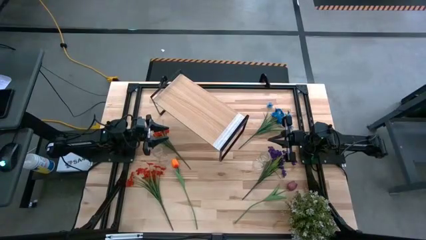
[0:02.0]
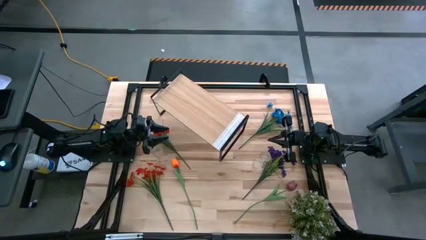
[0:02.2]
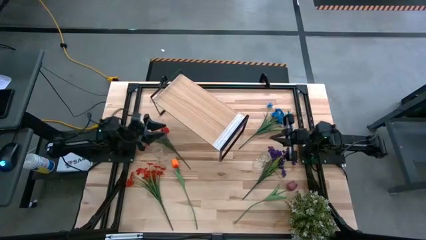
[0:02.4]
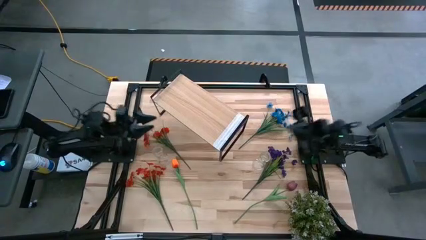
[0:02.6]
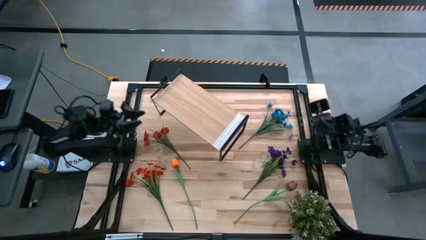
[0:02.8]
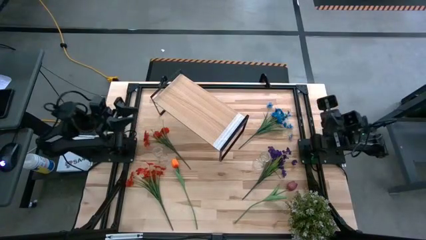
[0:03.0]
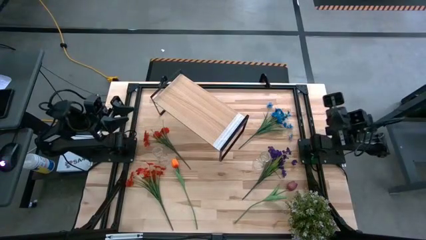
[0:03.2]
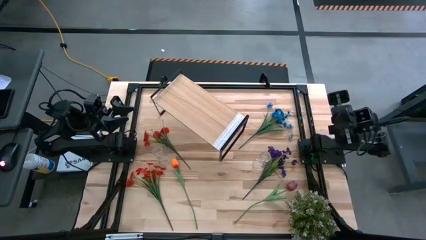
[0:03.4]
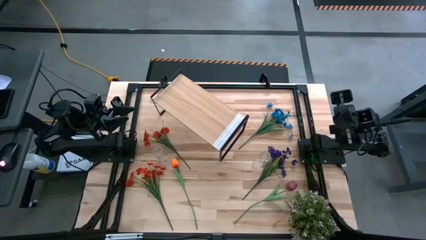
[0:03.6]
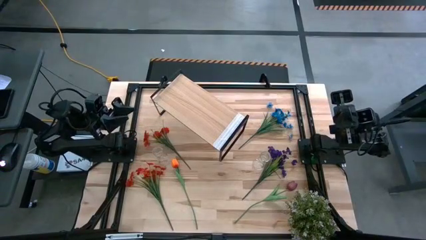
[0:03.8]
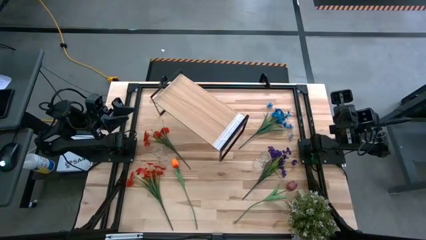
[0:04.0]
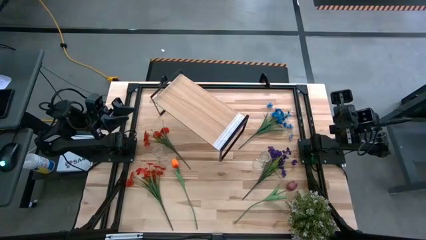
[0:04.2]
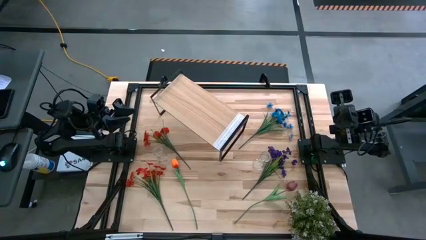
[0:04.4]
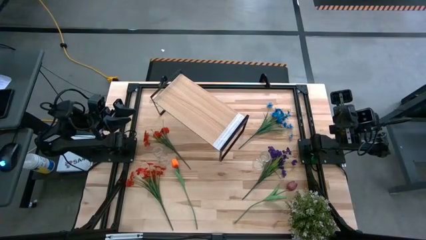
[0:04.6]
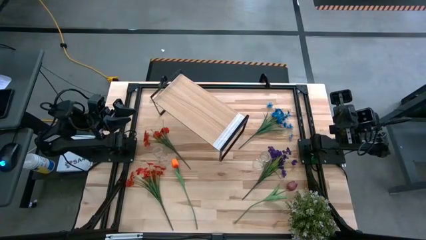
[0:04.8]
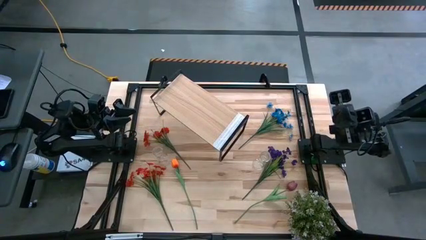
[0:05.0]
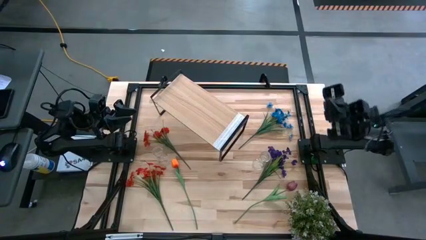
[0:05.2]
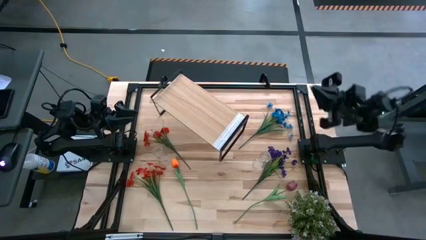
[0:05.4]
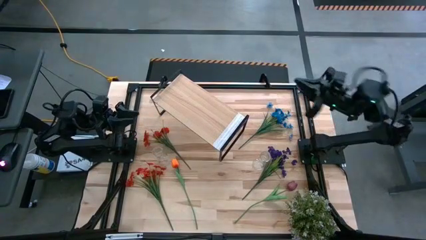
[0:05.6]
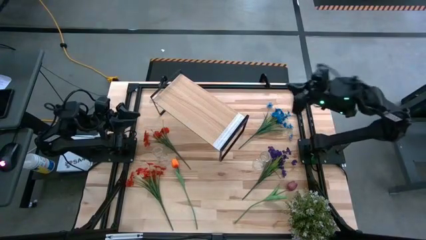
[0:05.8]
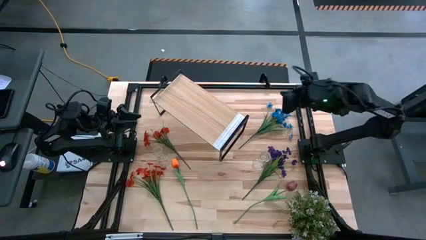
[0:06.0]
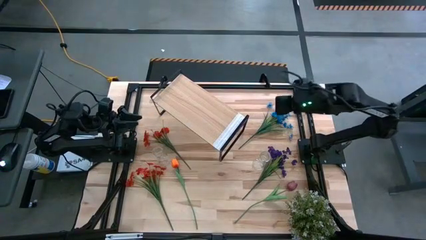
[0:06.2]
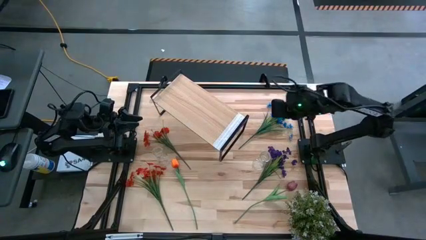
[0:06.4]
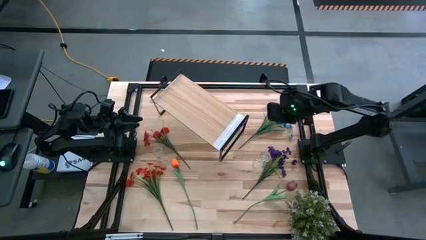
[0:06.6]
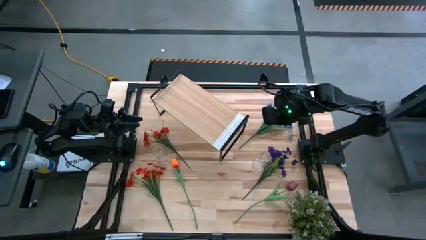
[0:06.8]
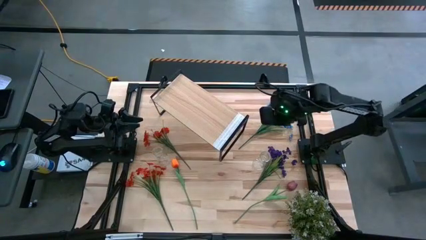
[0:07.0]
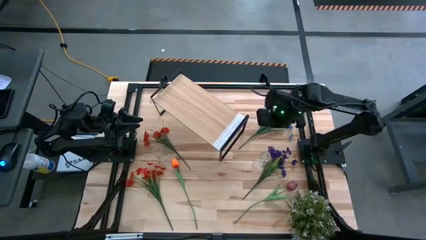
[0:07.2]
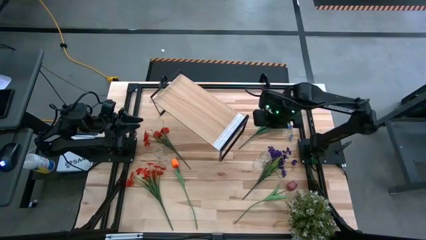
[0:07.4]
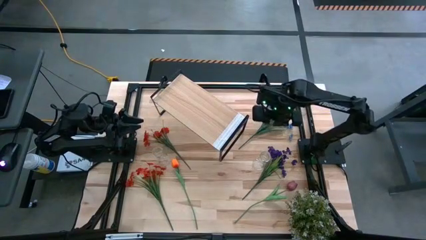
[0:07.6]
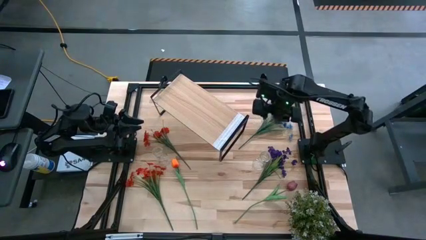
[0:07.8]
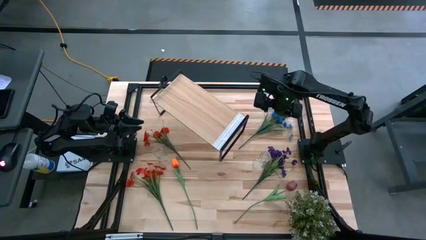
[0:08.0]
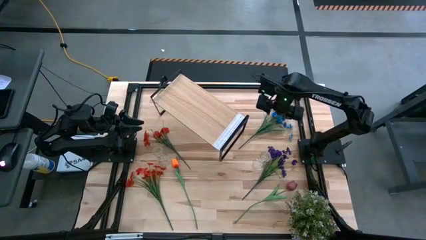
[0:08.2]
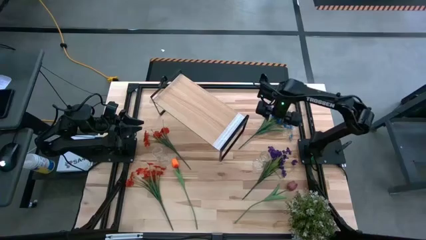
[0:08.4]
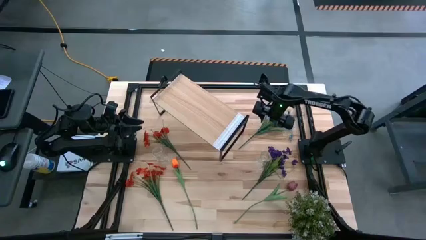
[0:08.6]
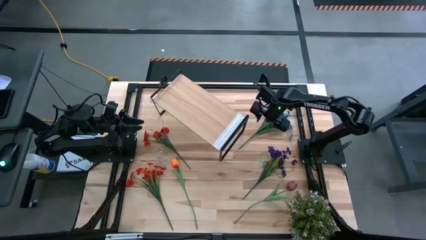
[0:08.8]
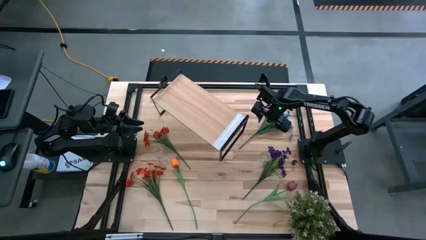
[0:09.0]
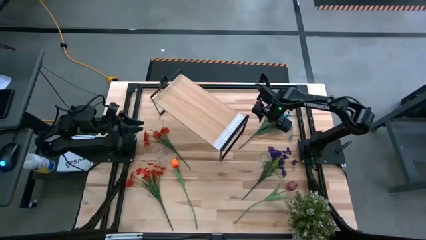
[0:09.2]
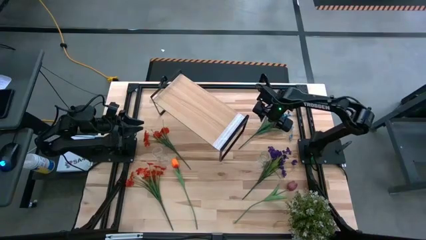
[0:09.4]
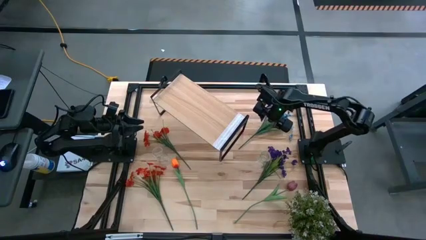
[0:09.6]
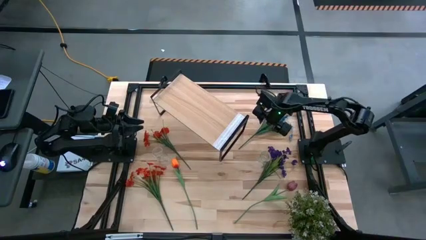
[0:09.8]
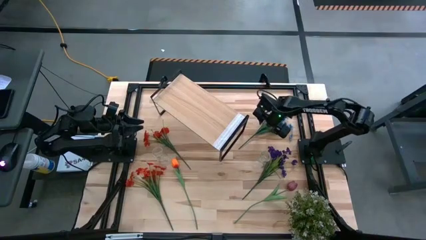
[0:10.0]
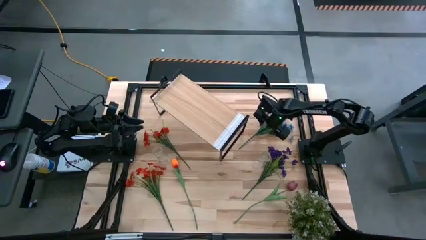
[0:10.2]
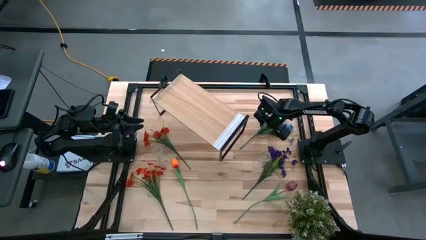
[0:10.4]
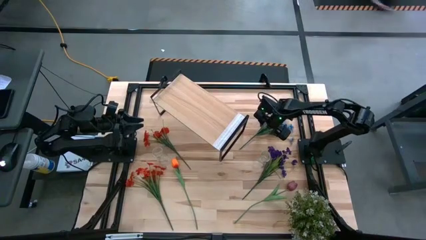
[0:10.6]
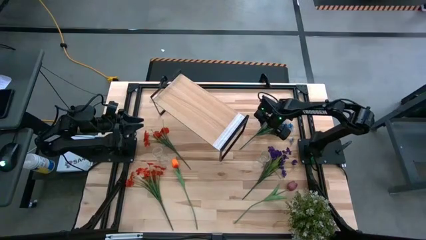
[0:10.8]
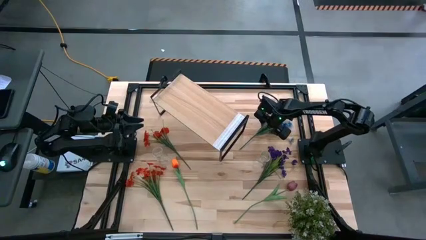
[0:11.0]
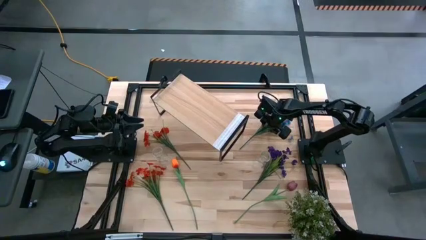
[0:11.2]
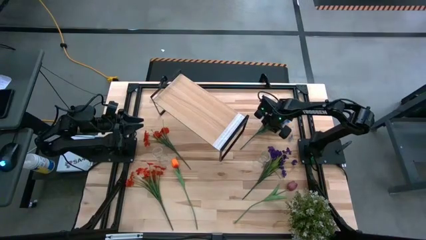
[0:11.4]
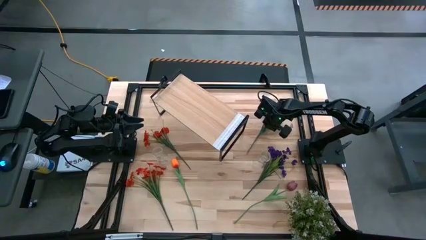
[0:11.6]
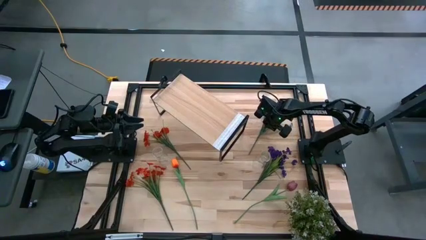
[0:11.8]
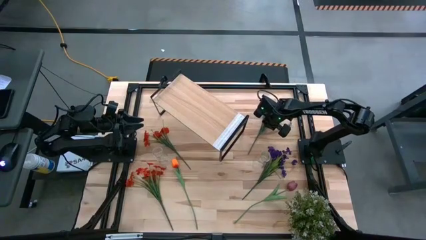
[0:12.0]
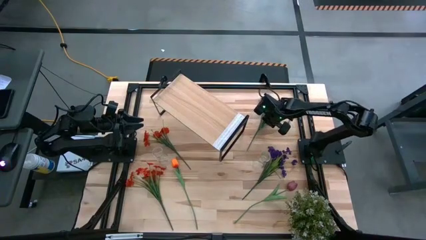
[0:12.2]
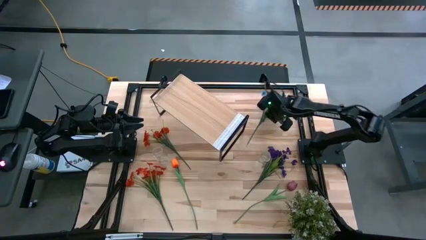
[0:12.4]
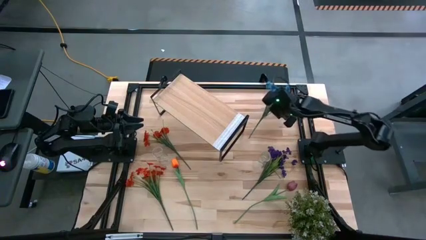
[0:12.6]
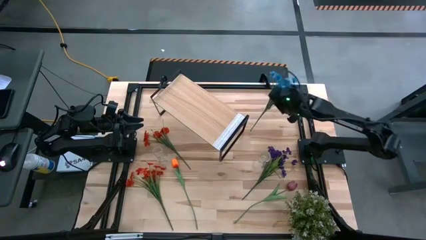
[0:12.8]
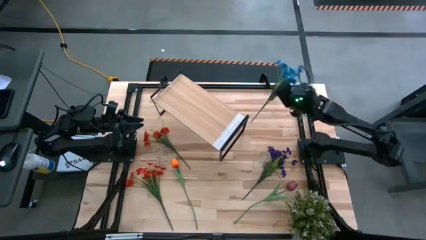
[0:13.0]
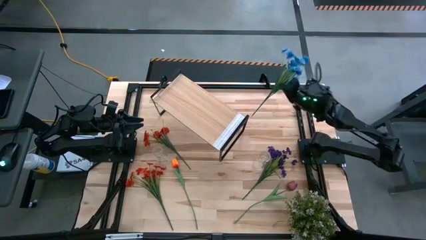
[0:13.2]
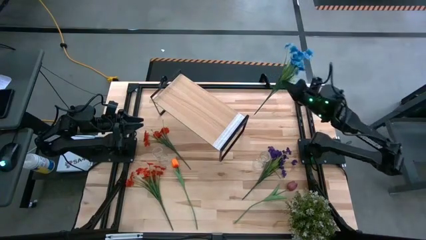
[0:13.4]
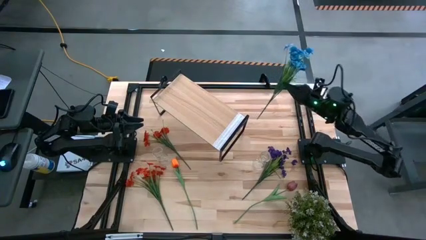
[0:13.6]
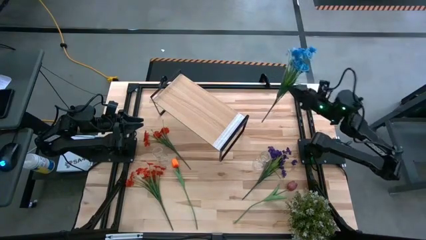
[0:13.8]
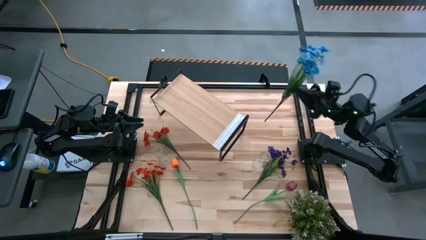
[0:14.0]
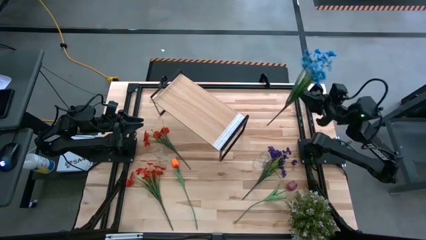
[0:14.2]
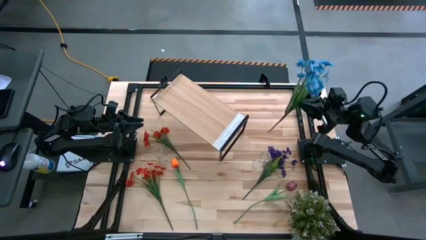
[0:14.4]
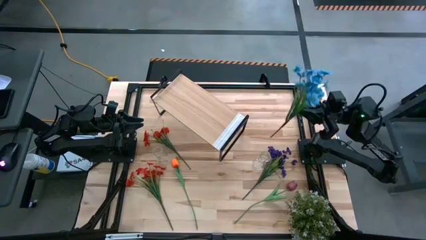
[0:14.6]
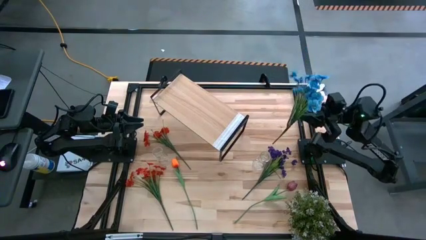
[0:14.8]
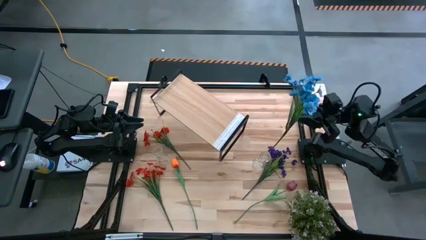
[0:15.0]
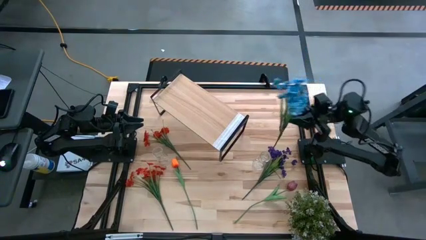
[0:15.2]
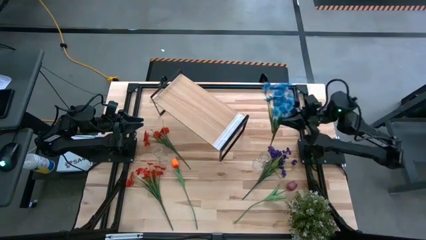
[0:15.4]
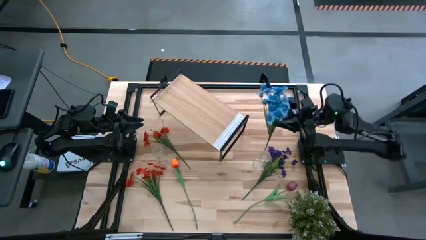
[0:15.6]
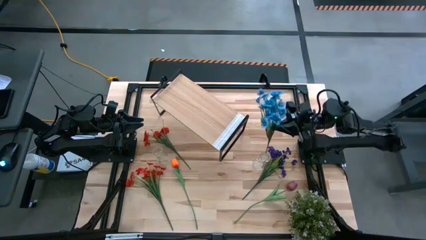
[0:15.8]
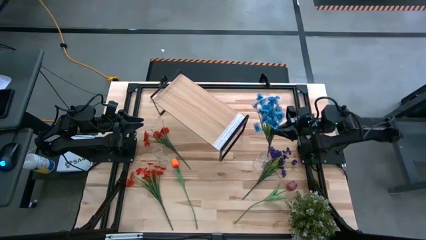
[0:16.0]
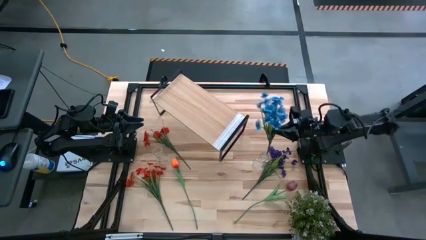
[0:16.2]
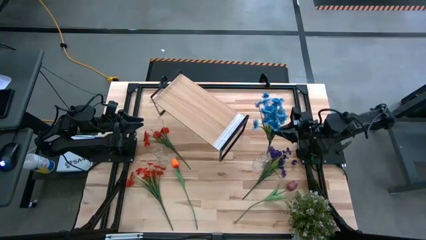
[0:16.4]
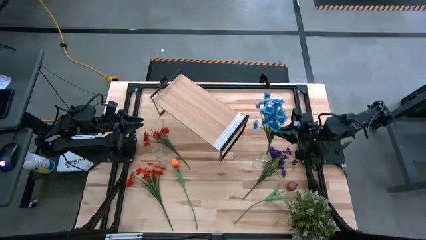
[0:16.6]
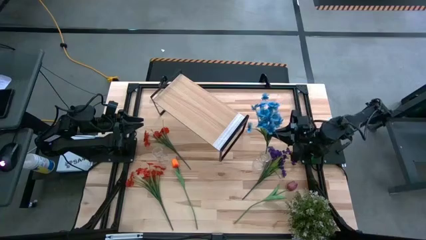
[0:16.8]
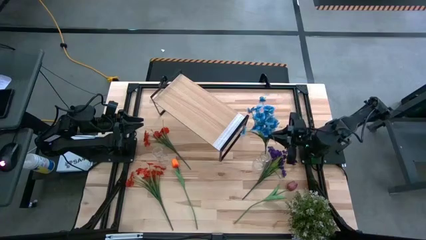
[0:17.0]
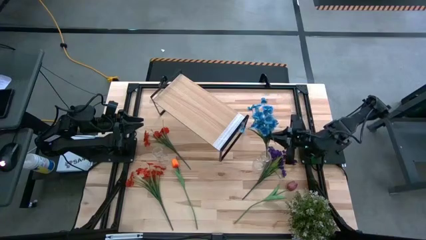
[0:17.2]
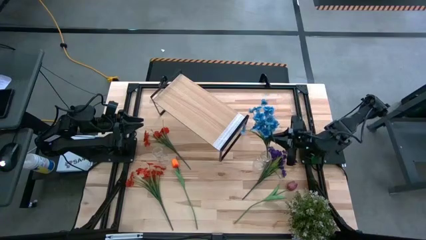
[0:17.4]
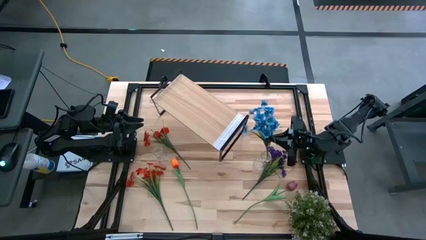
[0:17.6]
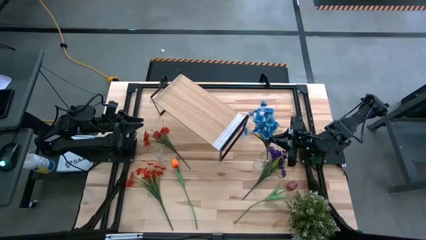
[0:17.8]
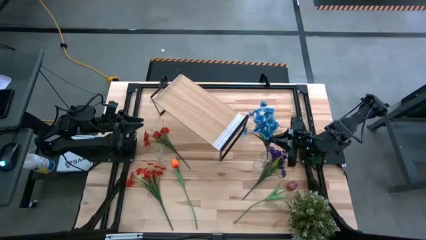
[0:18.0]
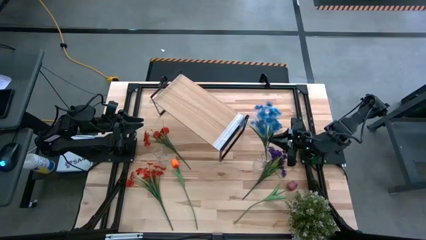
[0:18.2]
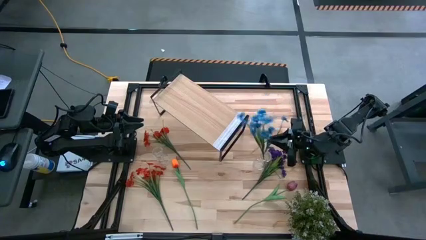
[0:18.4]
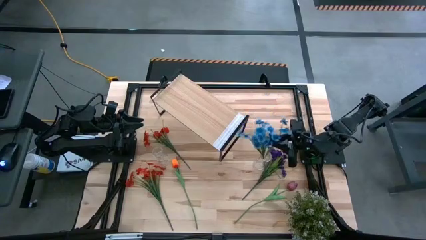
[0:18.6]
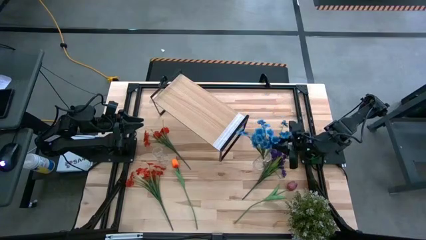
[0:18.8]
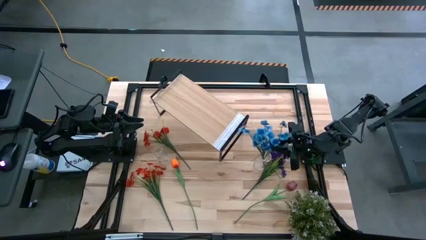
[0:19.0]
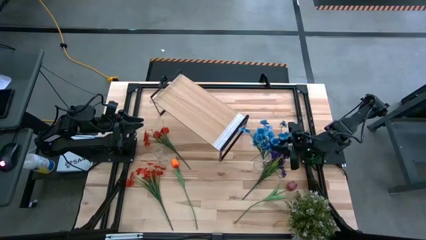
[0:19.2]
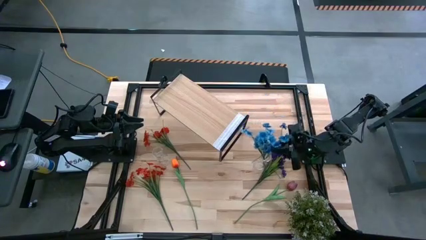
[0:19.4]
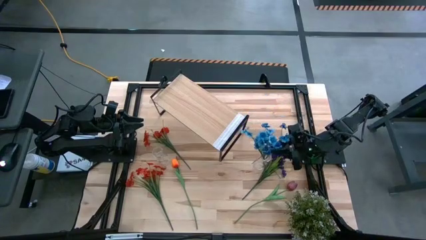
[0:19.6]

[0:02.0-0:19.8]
Task: Pick and place flowers into a vace then onto a shelf
Put the blue flower into the right transparent vase
